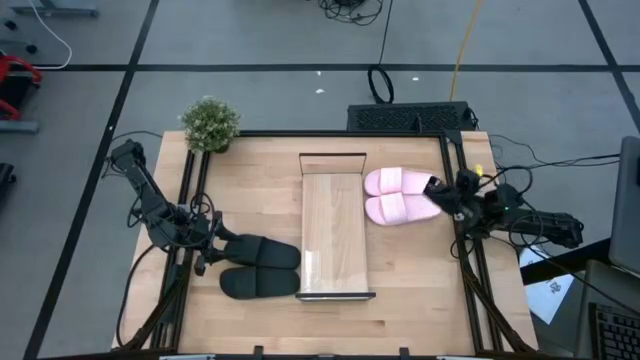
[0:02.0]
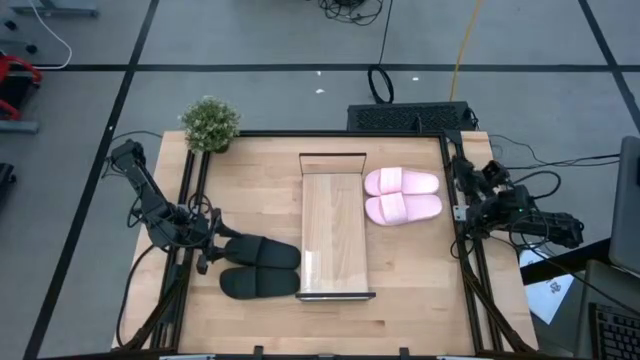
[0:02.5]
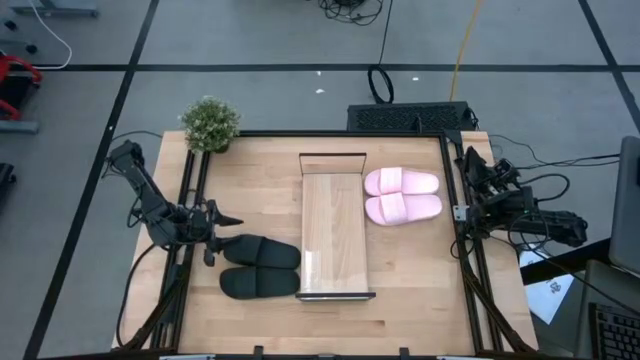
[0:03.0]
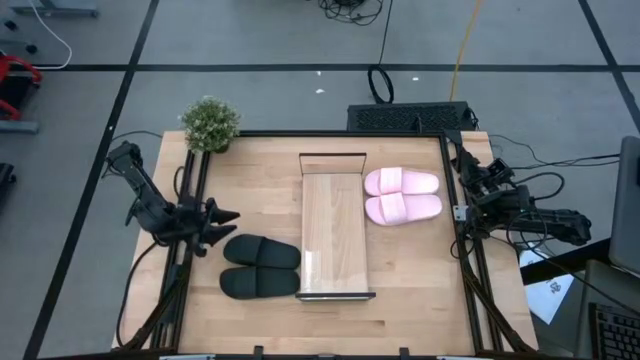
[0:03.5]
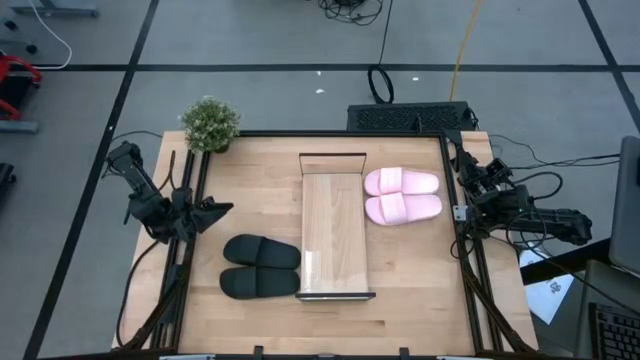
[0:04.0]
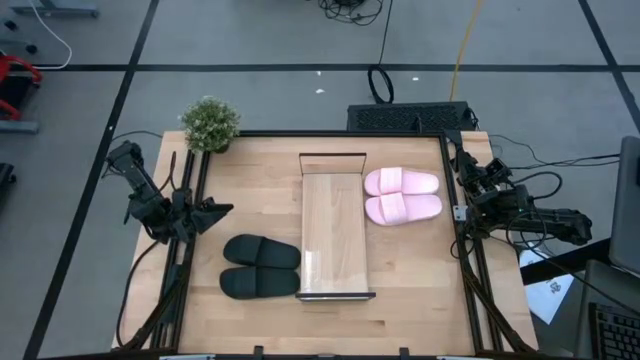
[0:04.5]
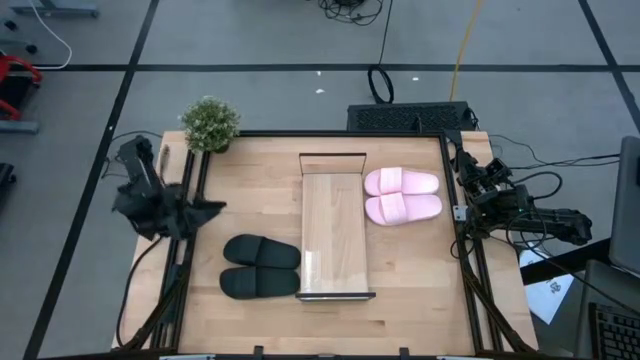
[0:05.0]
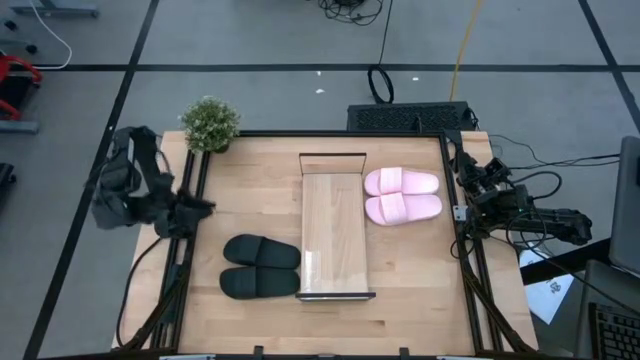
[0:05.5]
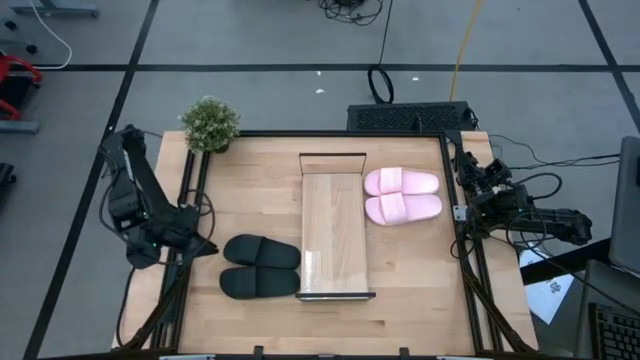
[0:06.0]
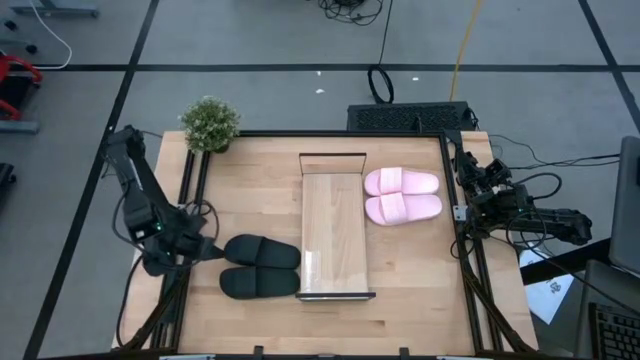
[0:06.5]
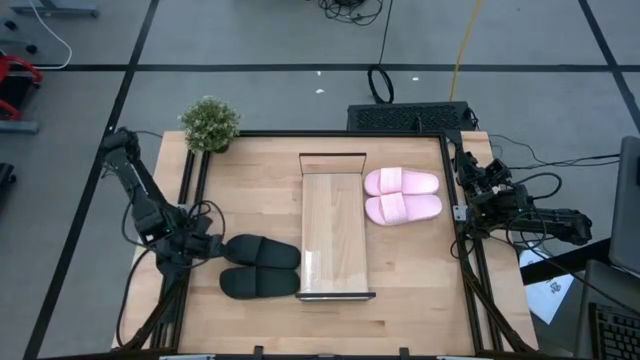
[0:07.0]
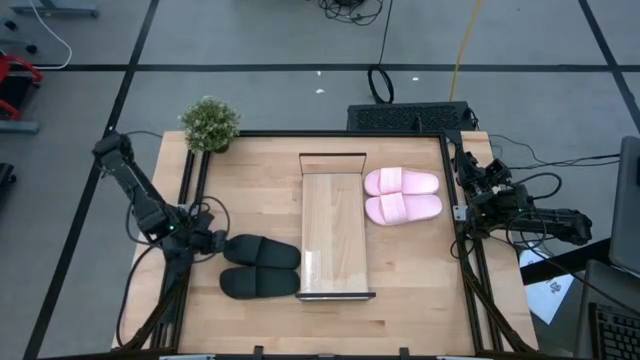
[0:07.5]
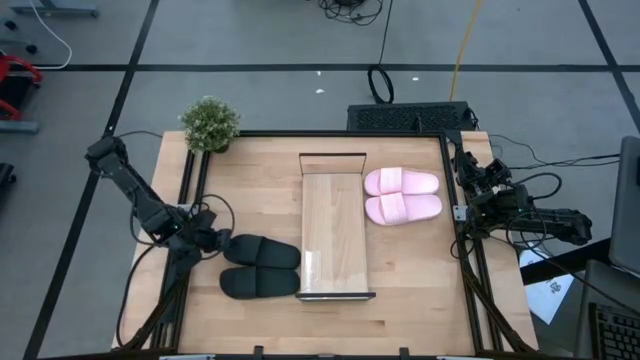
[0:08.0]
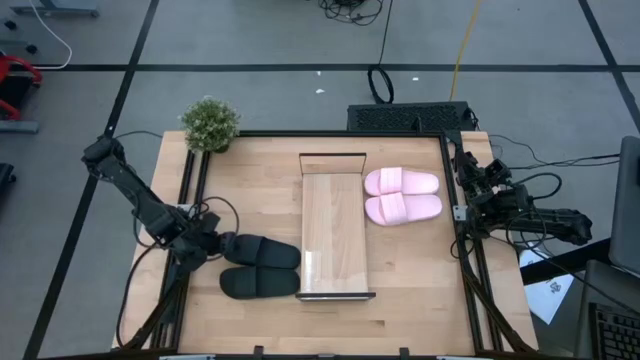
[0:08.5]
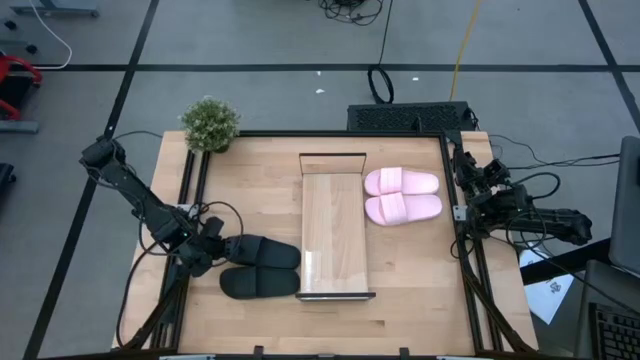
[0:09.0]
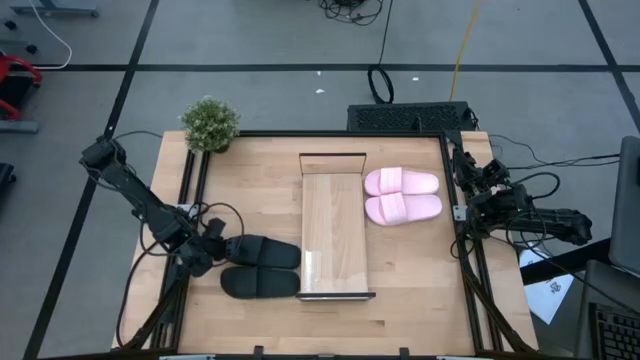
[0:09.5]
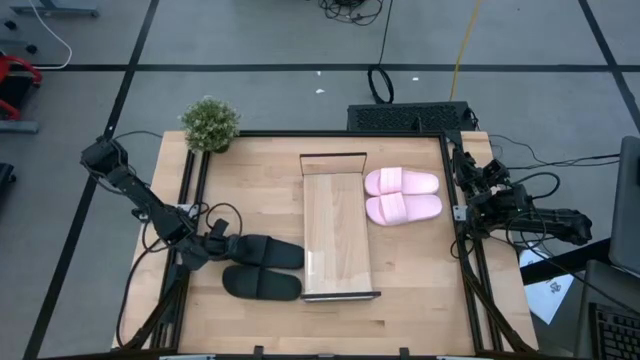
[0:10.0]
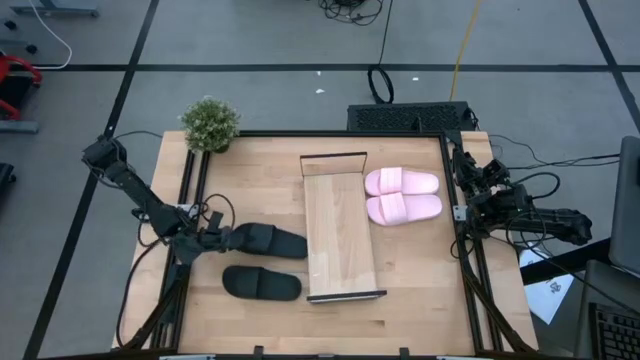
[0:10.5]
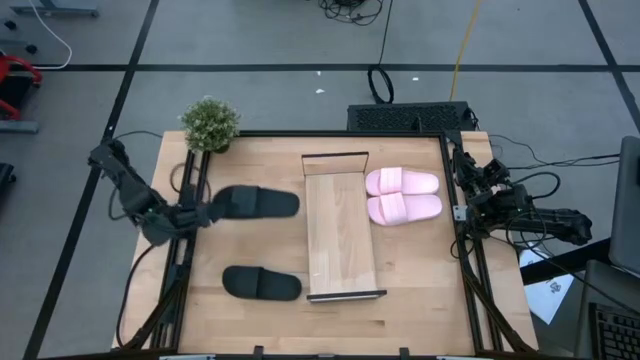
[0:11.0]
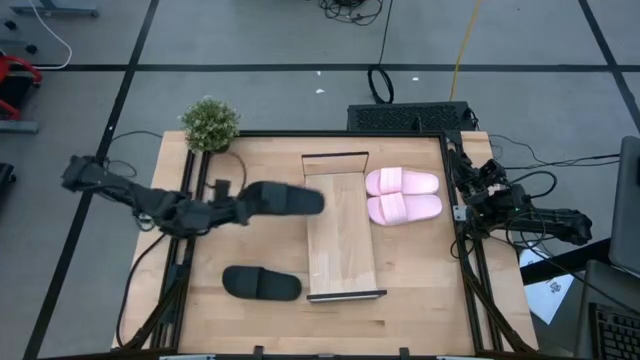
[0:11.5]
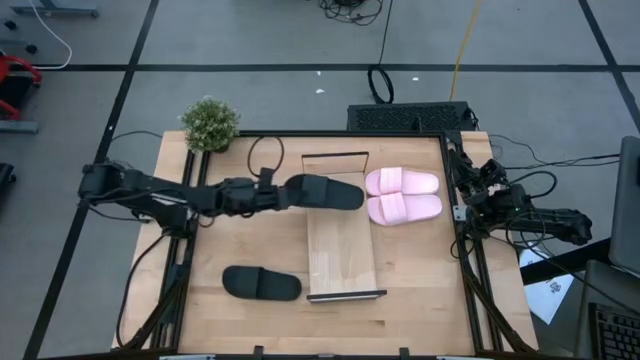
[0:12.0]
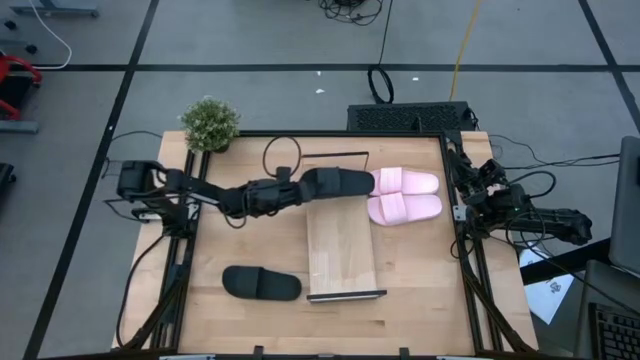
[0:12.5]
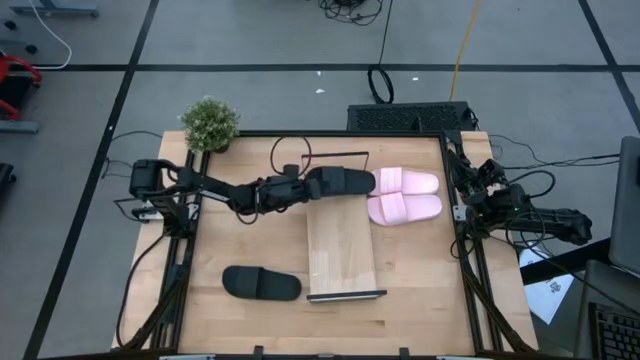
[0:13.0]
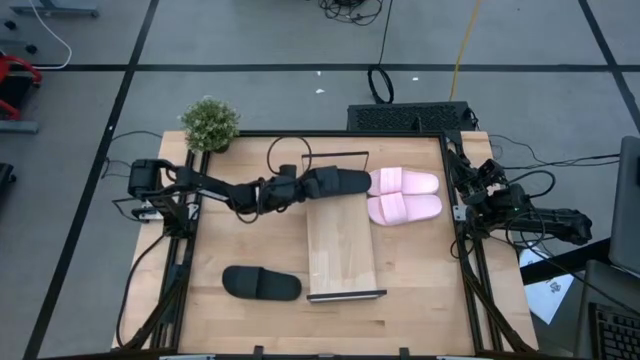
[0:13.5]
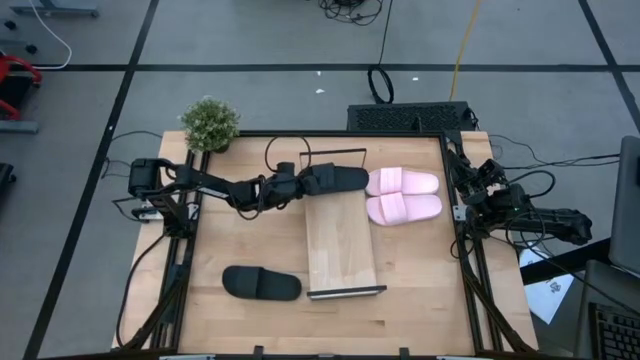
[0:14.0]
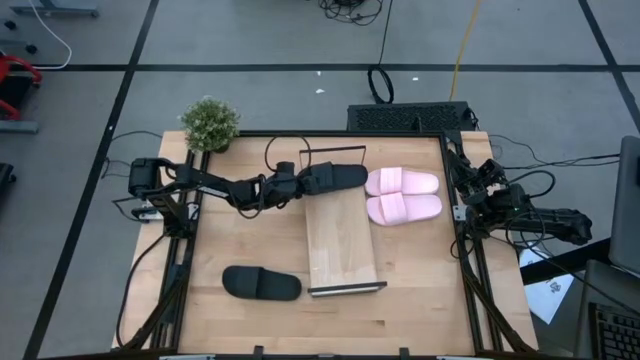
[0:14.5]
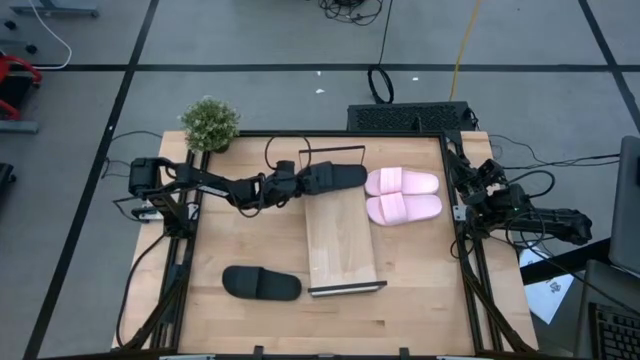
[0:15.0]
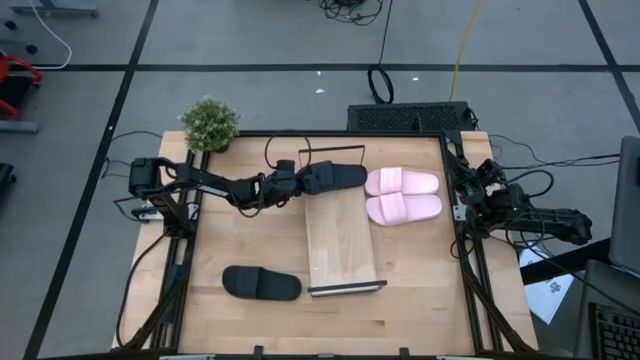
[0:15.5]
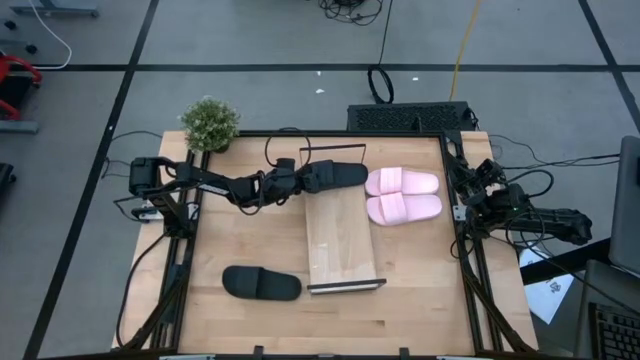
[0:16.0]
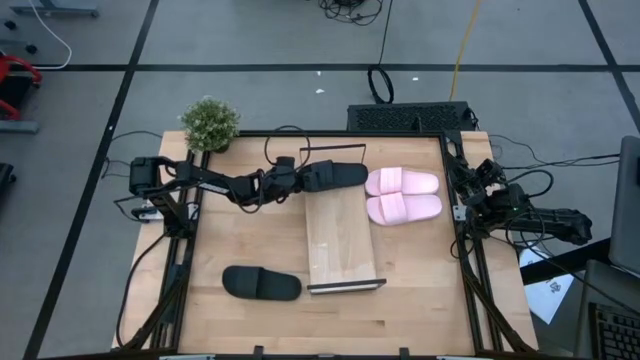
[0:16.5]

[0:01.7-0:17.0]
Task: Pick and place slides into the shelf
Put the top black slide on the shelf

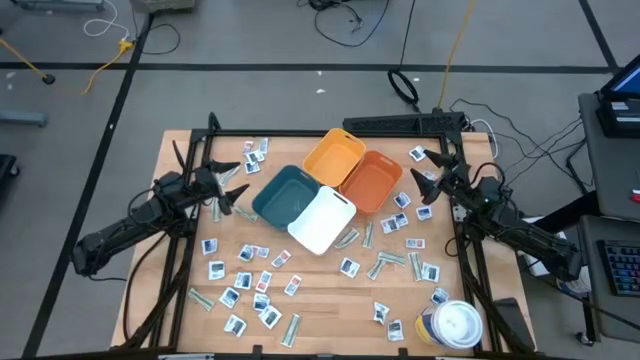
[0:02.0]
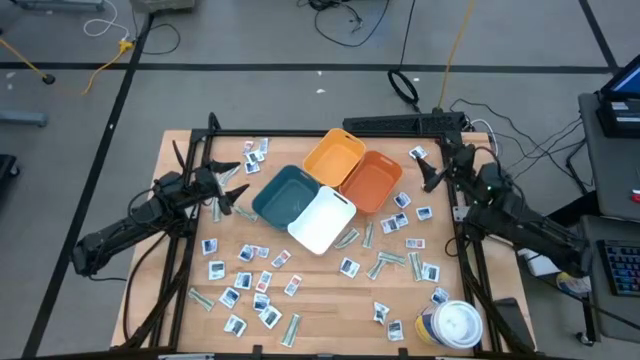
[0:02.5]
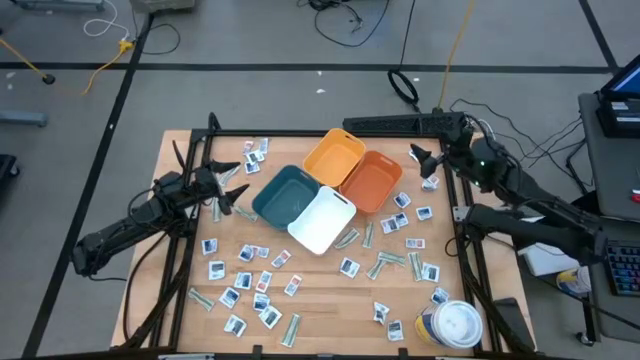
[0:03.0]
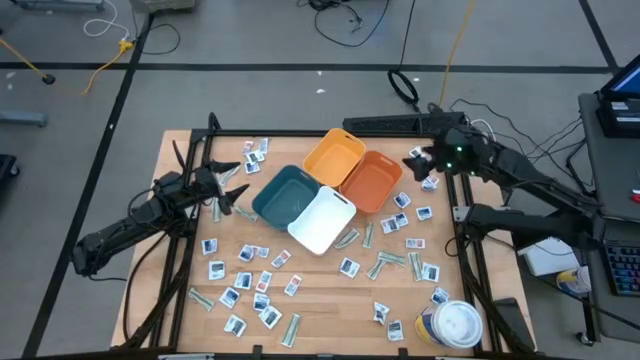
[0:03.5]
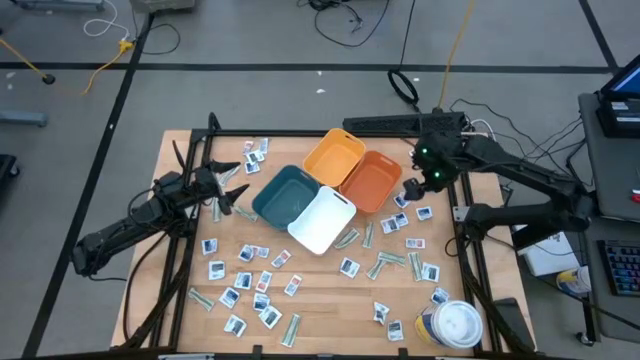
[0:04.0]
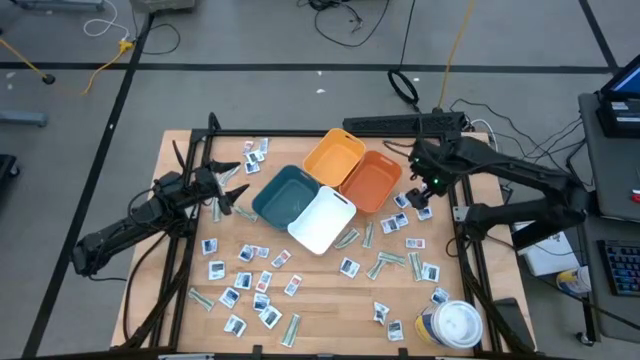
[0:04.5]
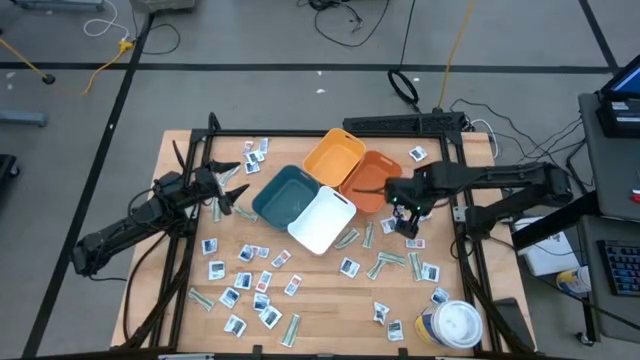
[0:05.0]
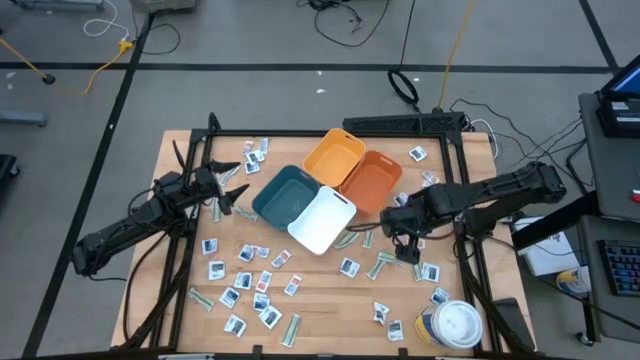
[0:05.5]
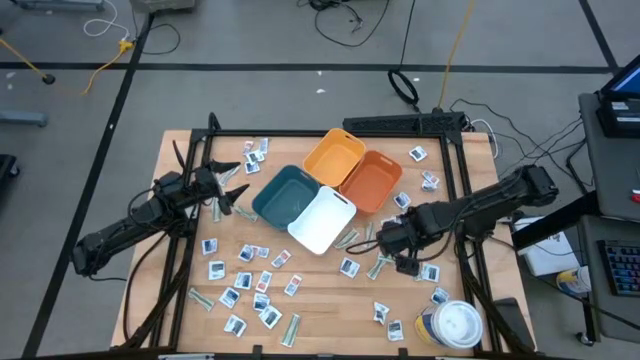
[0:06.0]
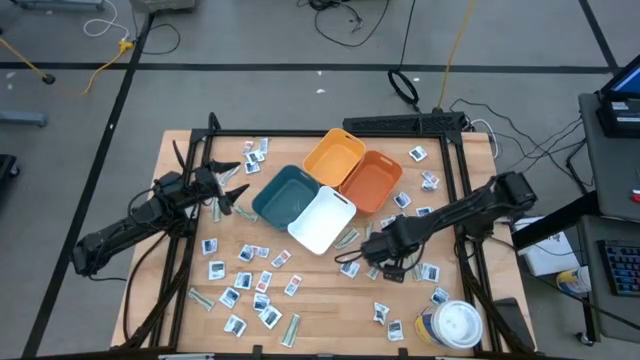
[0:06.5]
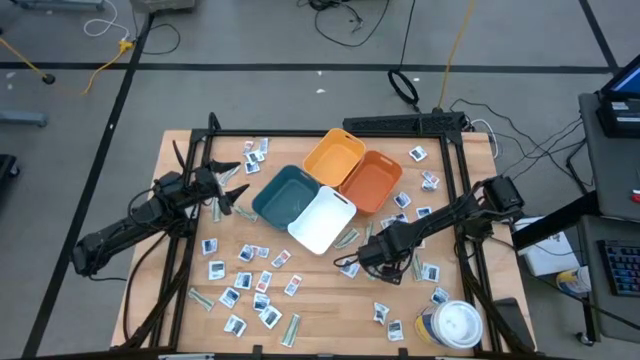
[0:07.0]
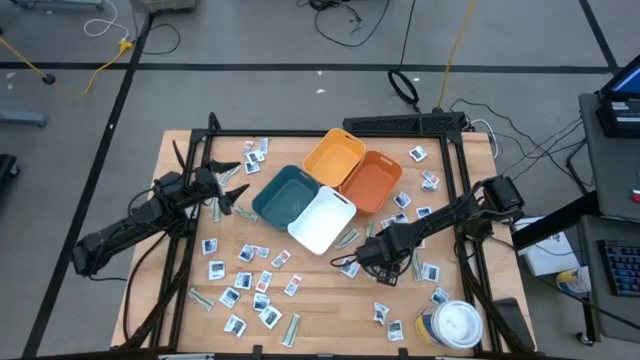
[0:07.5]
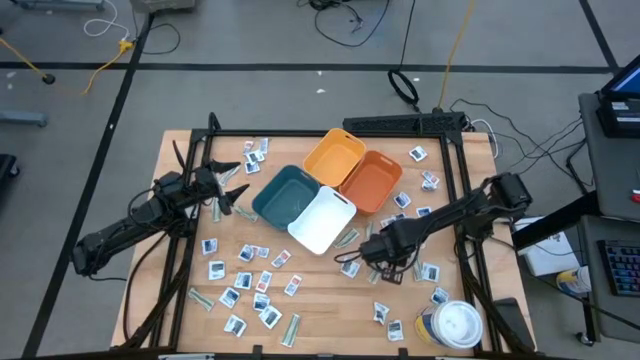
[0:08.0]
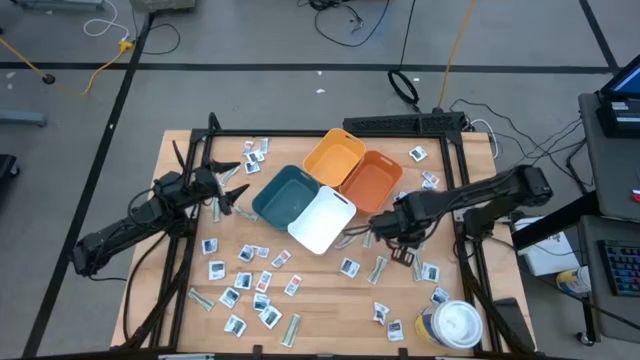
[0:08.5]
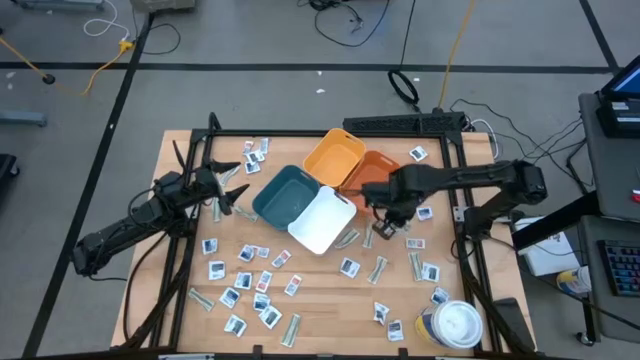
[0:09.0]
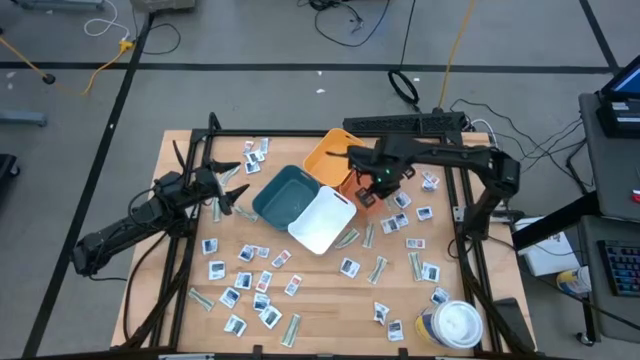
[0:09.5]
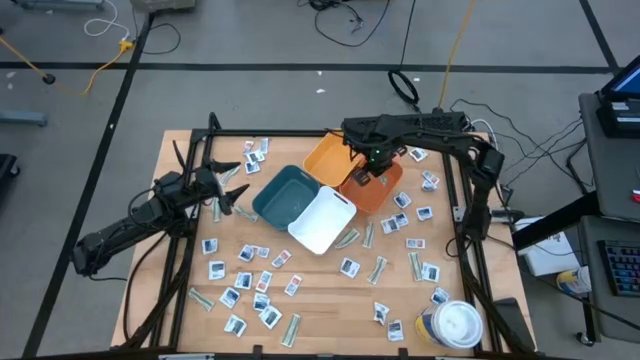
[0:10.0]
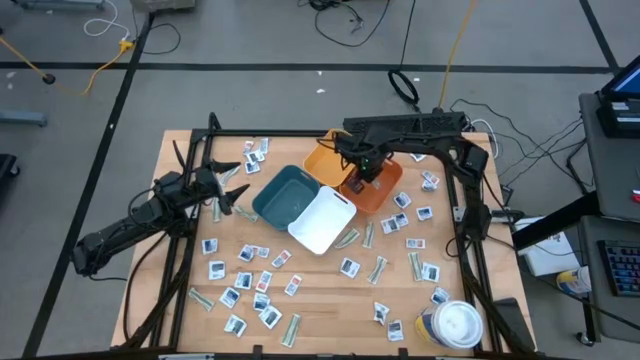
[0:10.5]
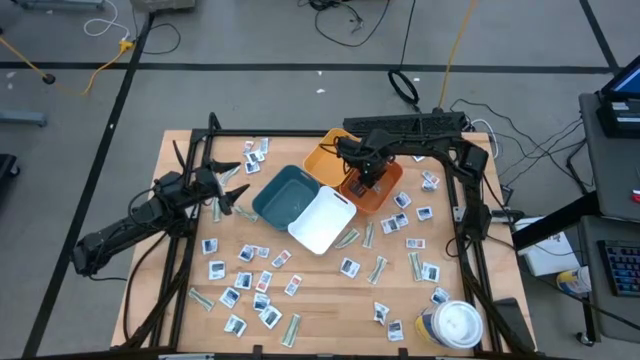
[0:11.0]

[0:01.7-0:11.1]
Task: Pick & Place First Aid Supplies
Put the green bandage pack into the orange bin
